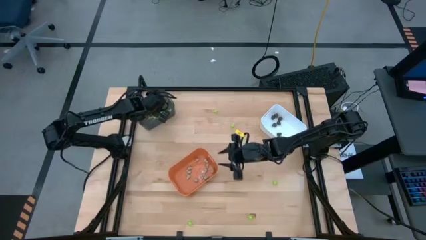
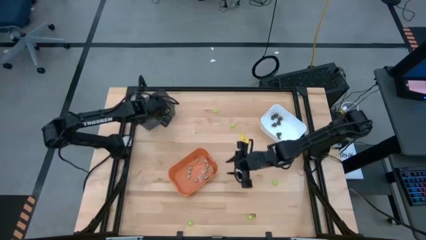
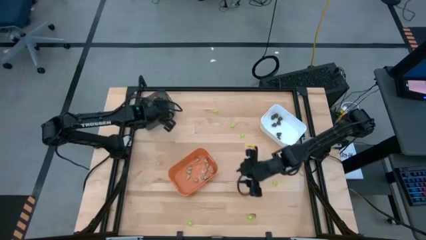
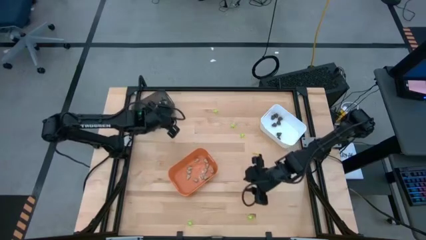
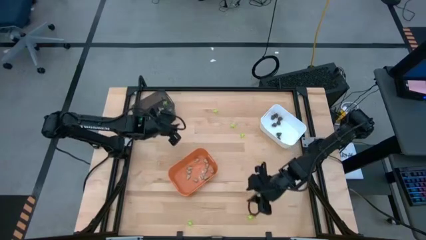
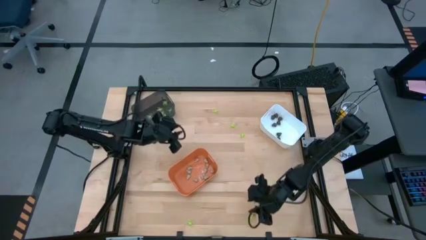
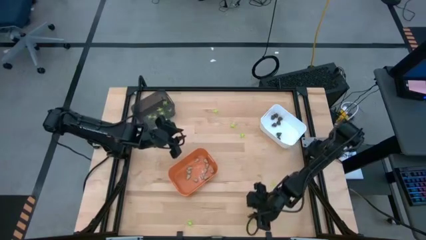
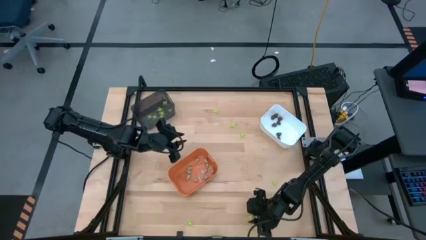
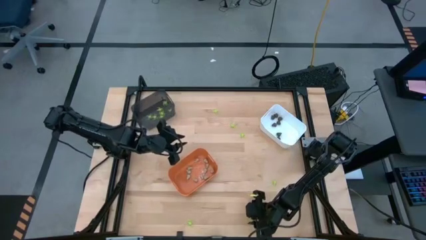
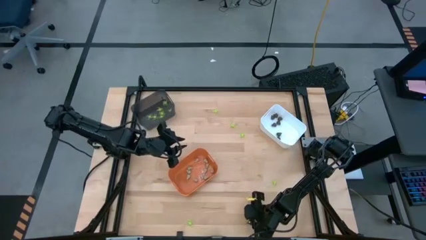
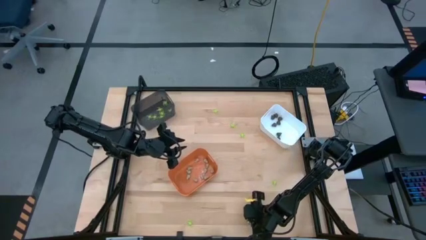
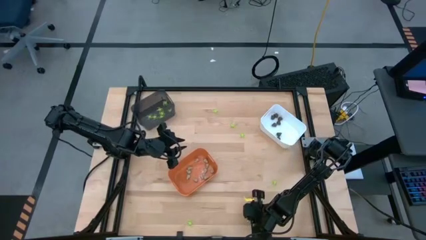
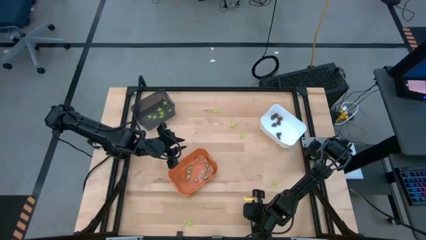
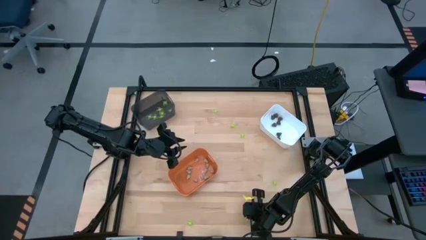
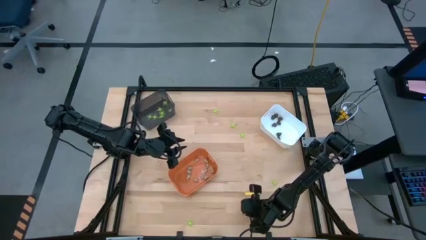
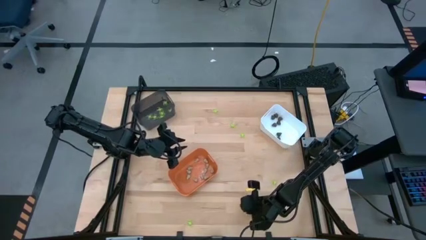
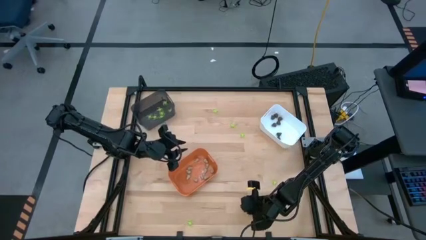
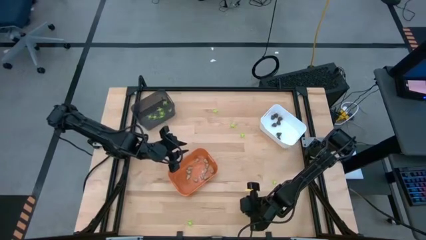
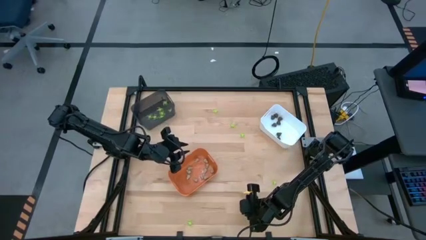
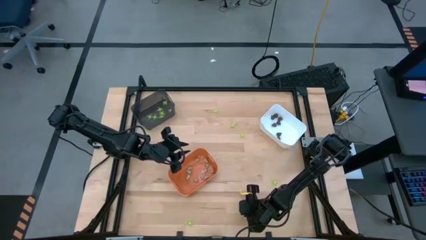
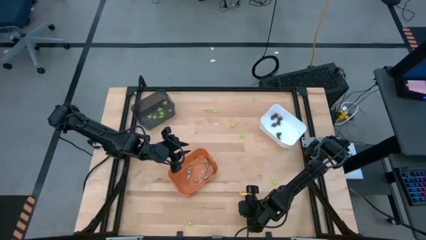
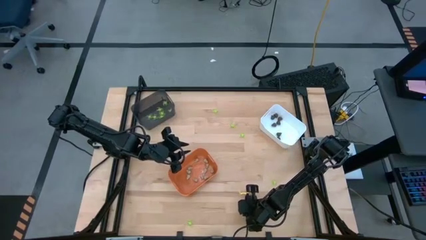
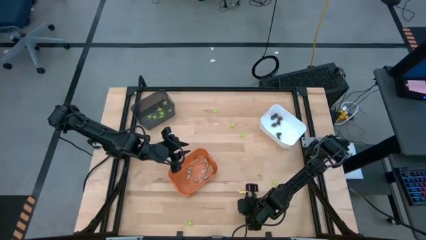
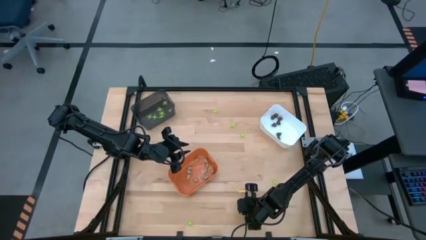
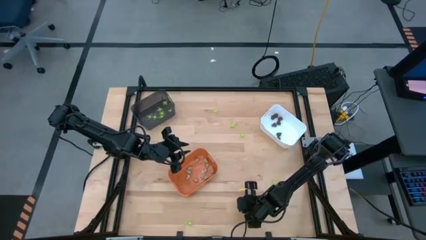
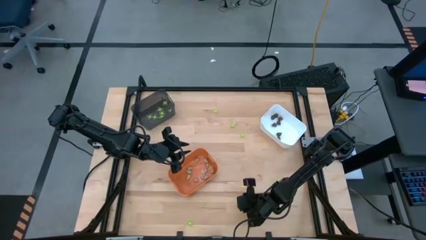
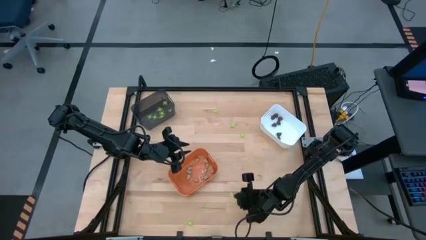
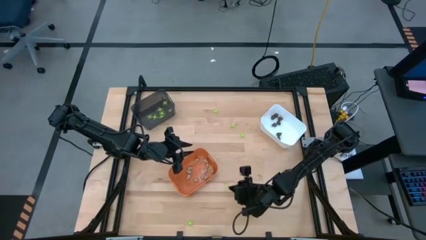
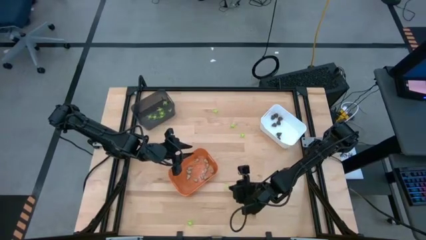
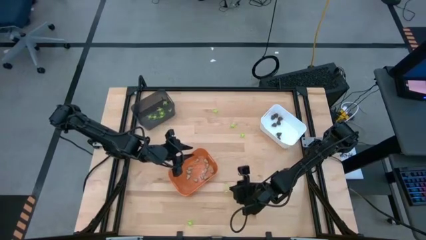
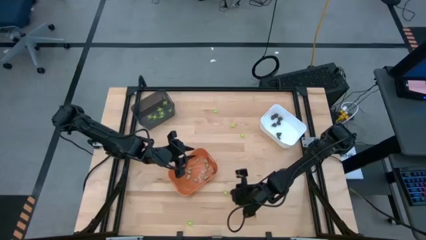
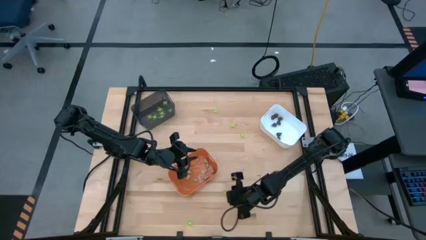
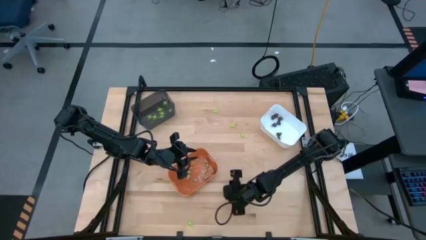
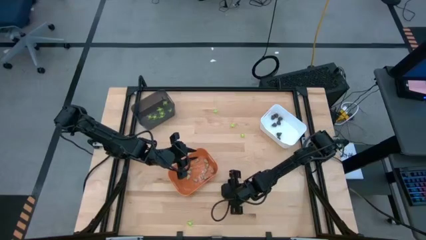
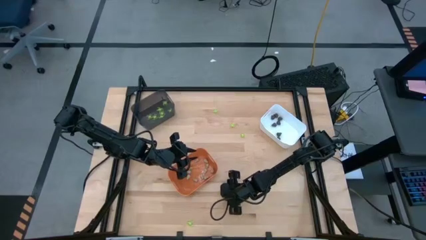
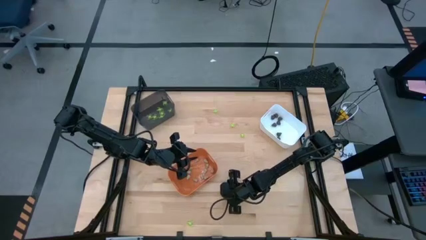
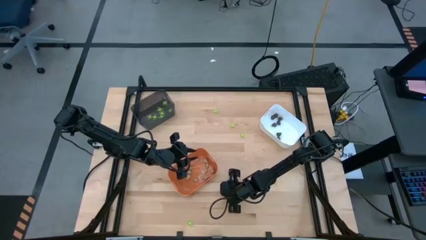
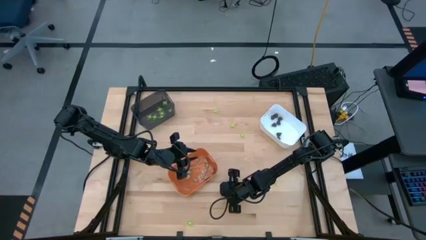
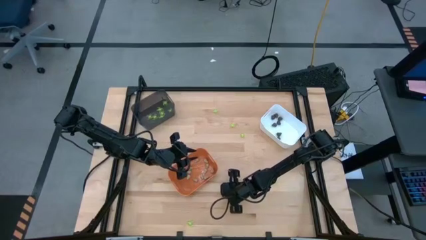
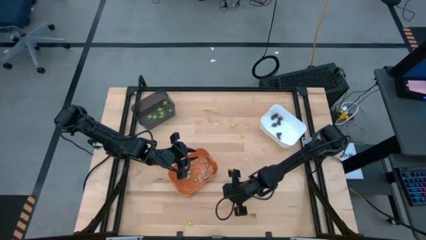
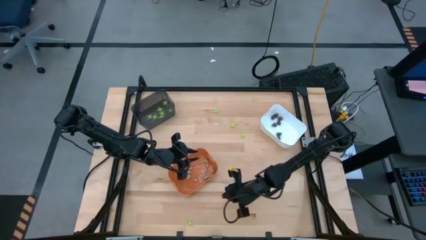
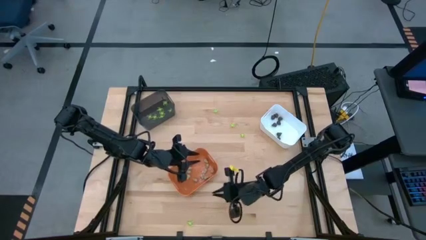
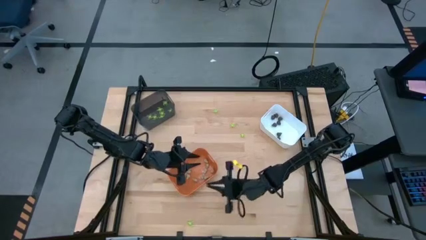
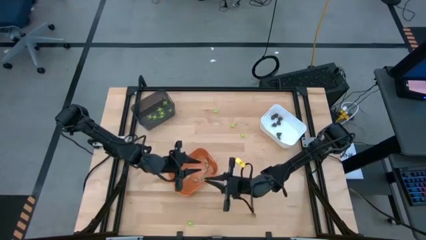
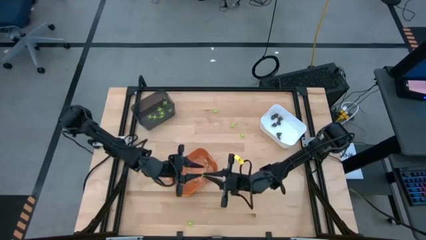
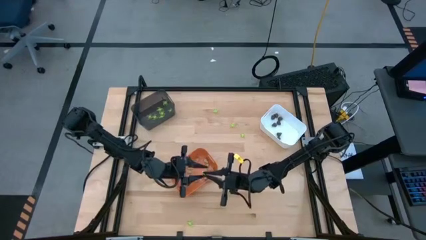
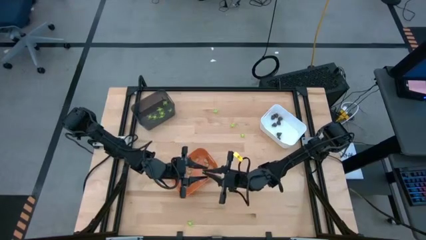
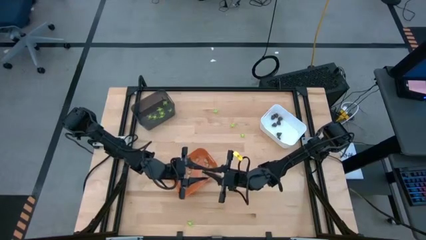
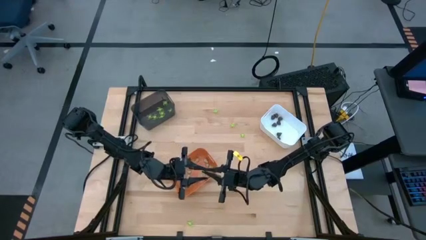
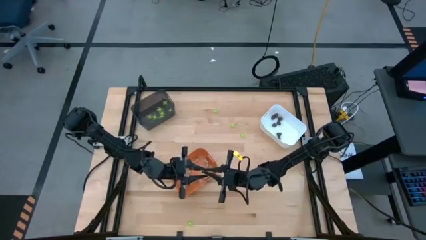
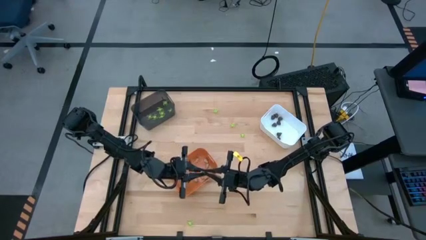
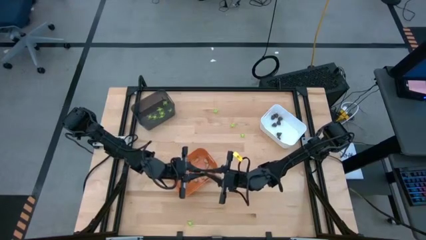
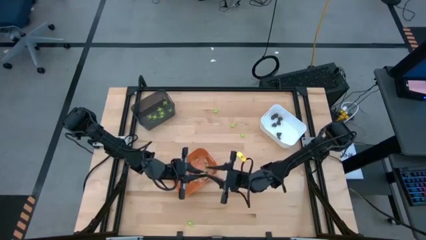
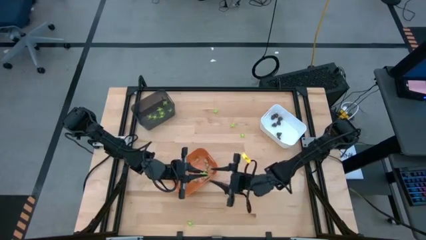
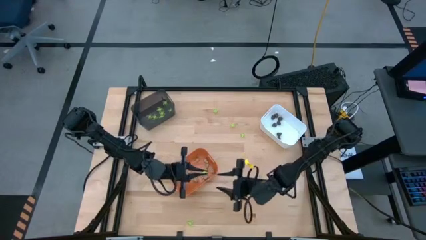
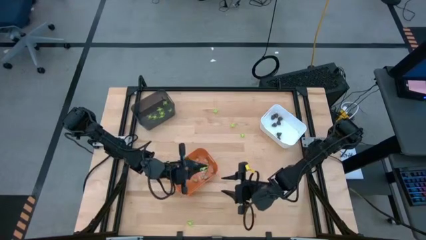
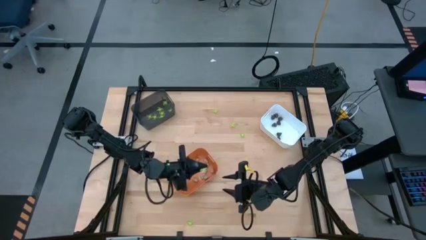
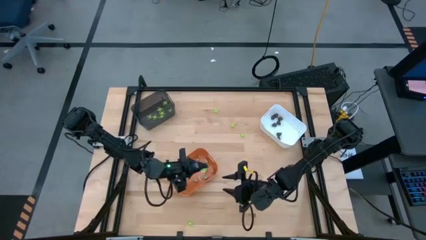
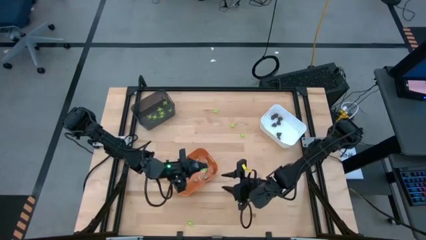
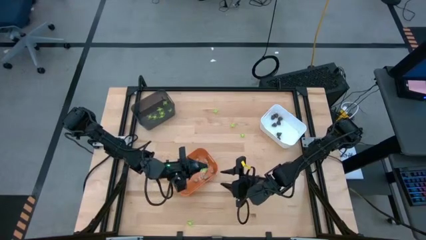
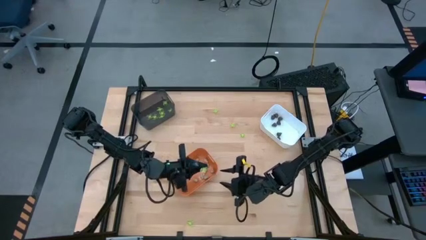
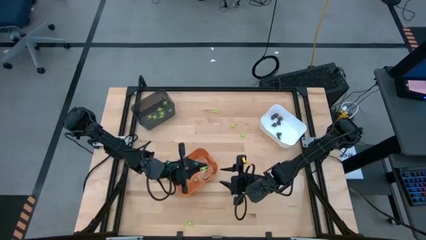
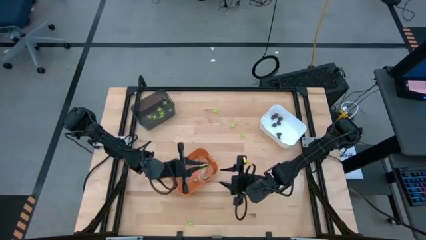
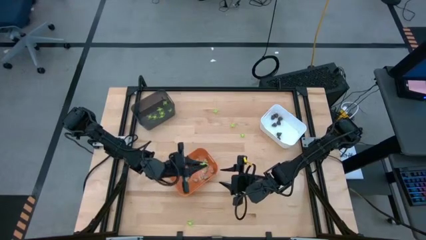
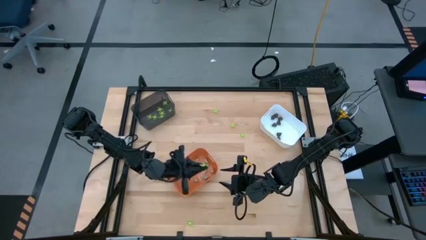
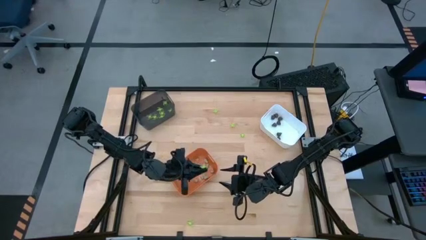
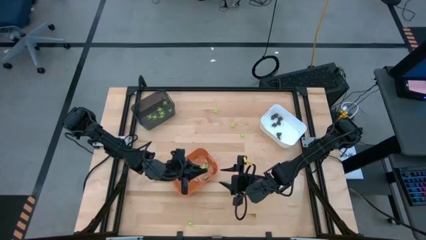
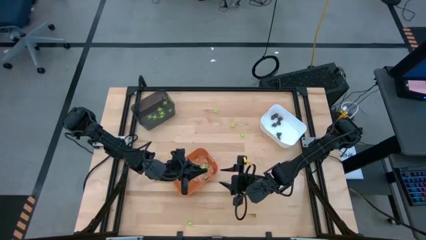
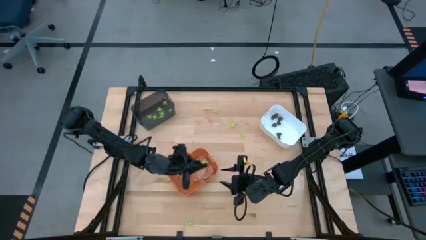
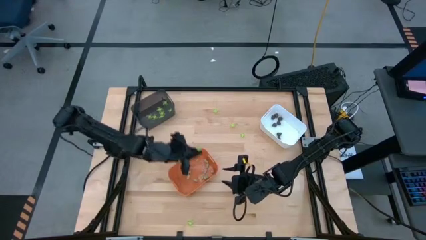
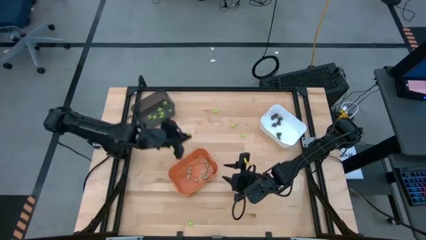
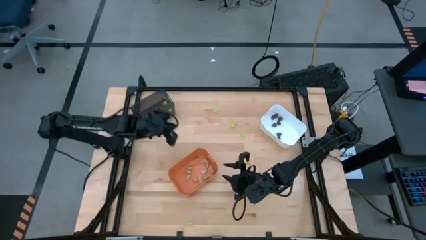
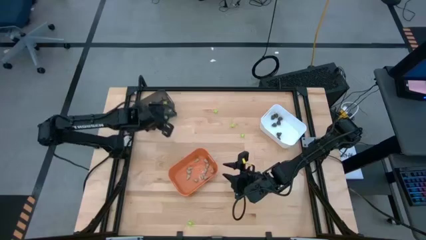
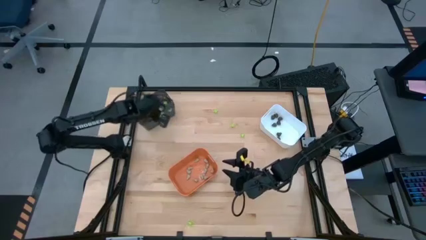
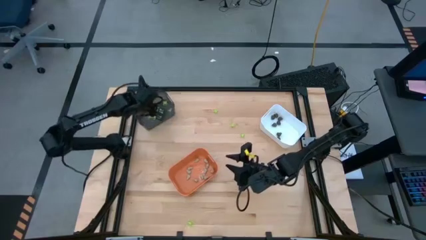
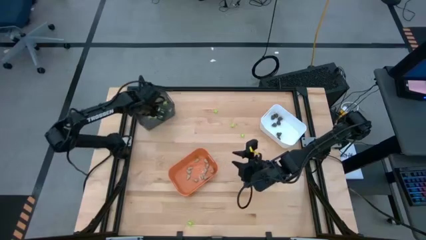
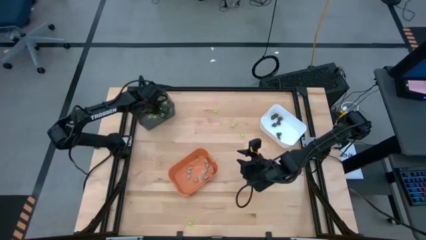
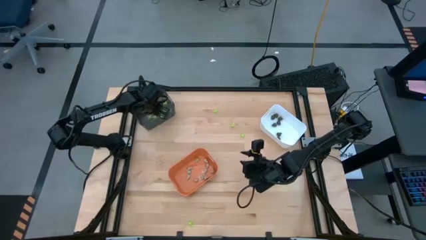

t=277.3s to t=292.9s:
Task: Sort Halloween decoration
Put the green spider toy into the black bin
